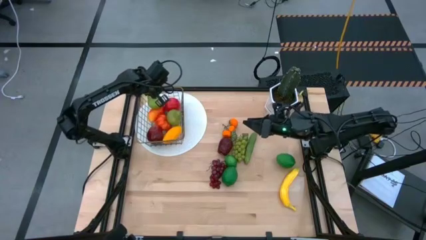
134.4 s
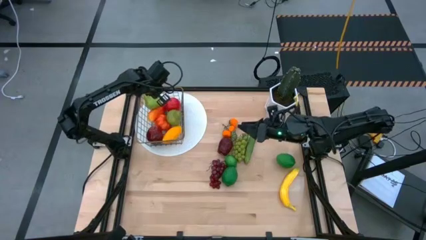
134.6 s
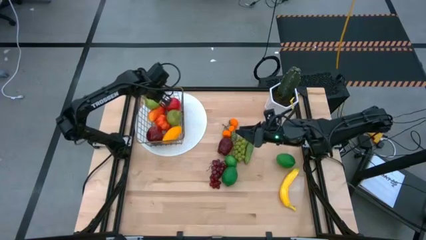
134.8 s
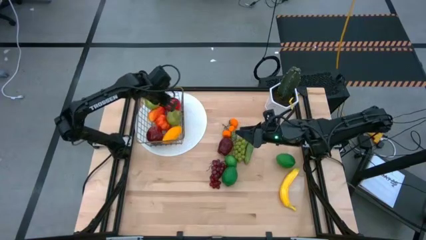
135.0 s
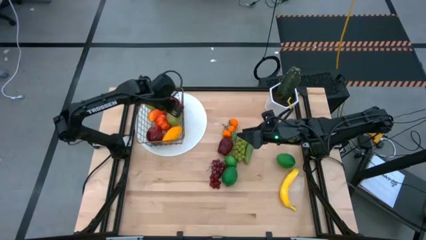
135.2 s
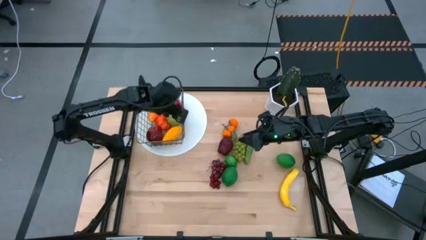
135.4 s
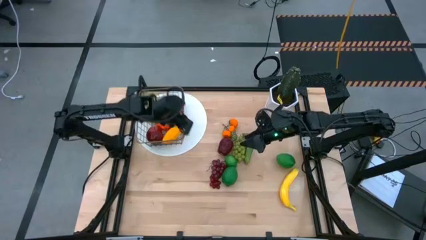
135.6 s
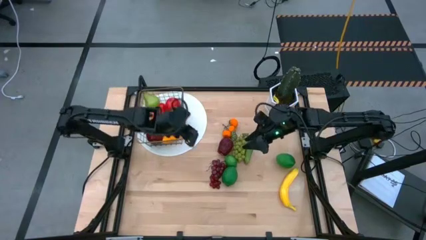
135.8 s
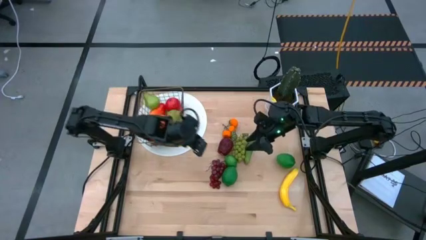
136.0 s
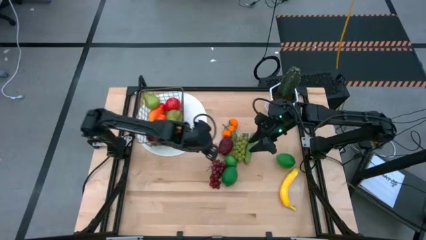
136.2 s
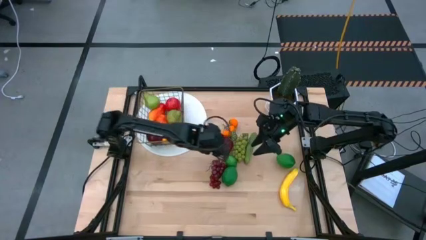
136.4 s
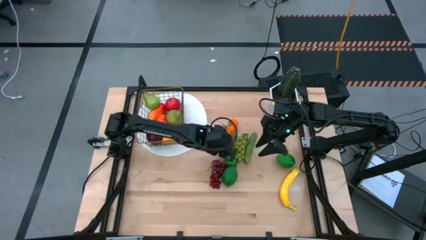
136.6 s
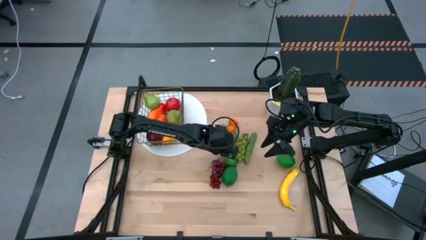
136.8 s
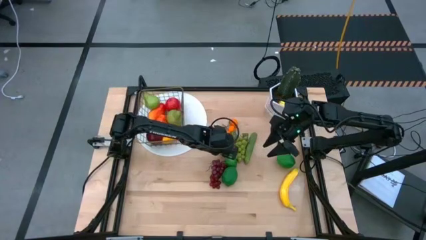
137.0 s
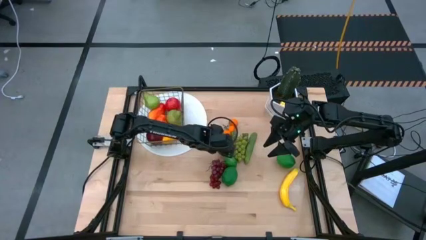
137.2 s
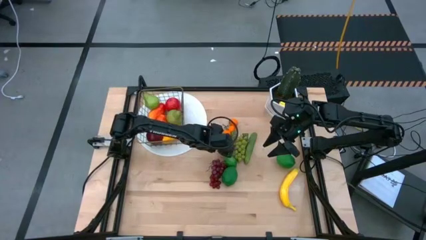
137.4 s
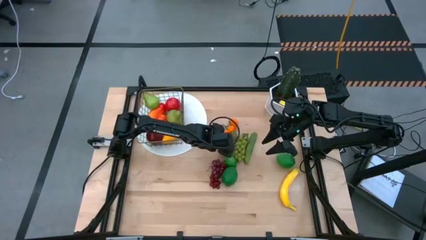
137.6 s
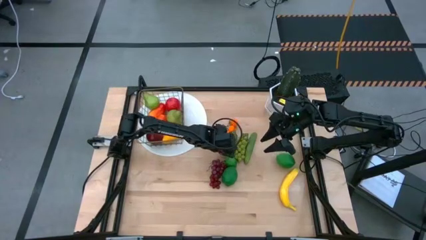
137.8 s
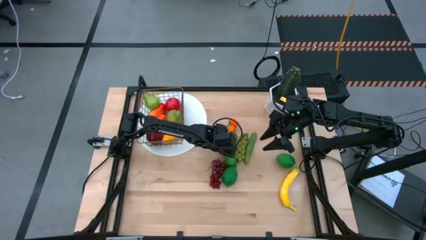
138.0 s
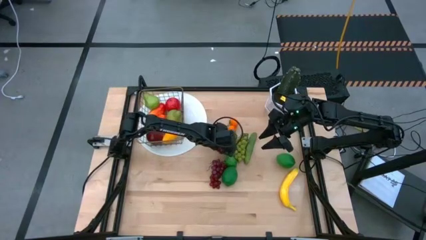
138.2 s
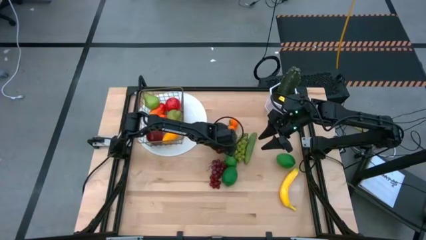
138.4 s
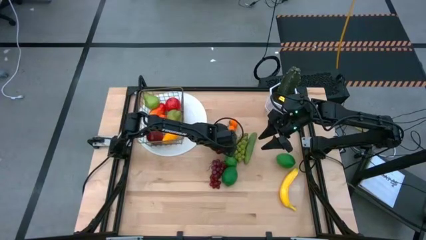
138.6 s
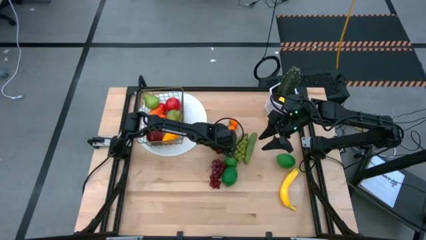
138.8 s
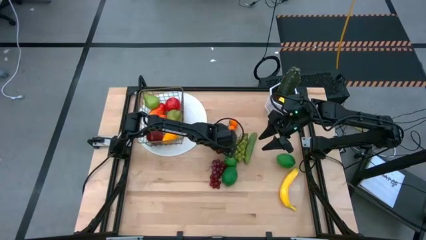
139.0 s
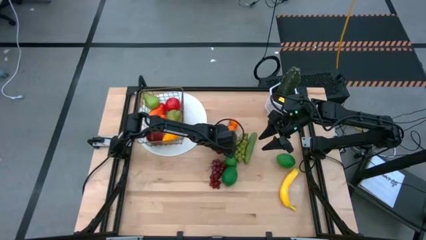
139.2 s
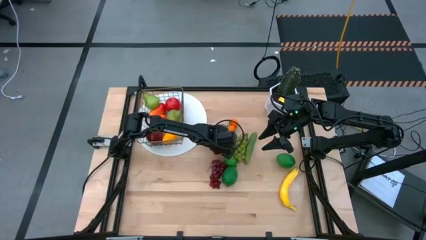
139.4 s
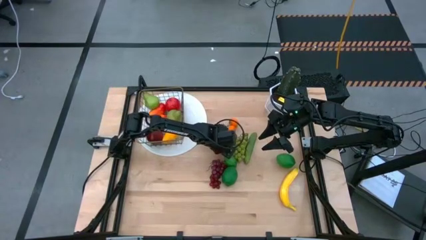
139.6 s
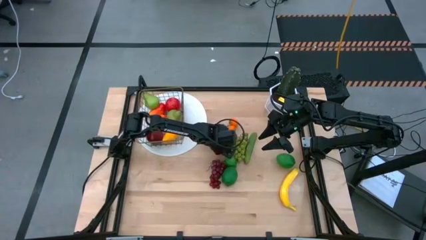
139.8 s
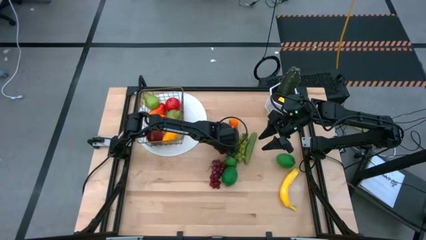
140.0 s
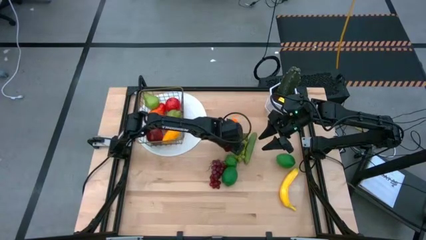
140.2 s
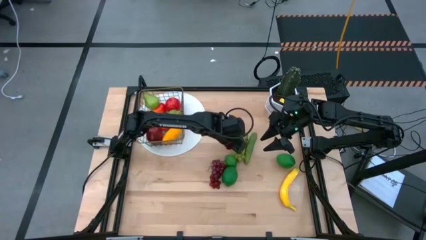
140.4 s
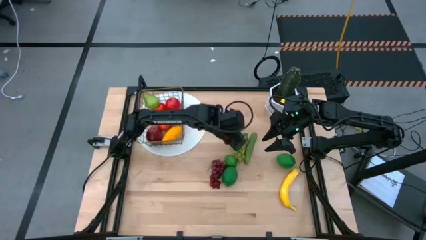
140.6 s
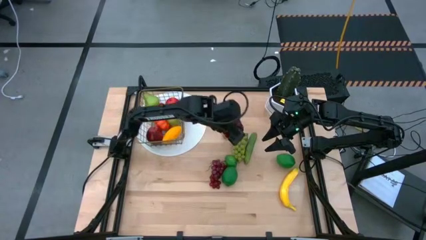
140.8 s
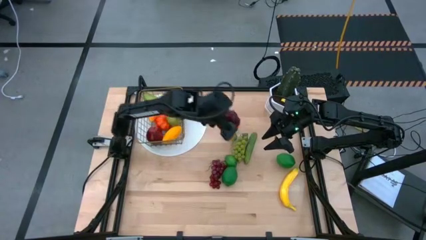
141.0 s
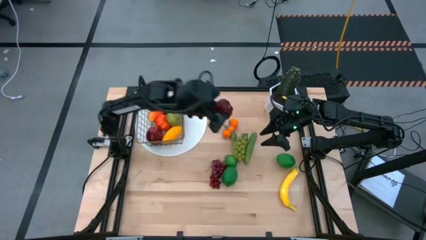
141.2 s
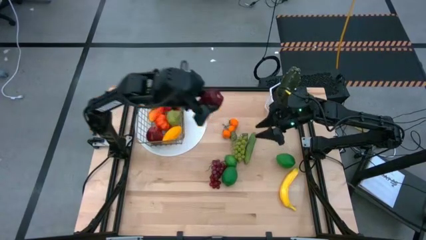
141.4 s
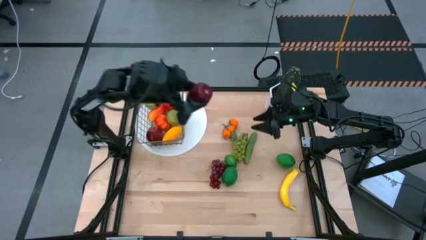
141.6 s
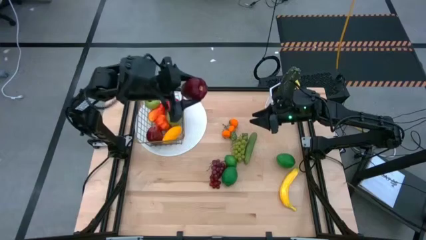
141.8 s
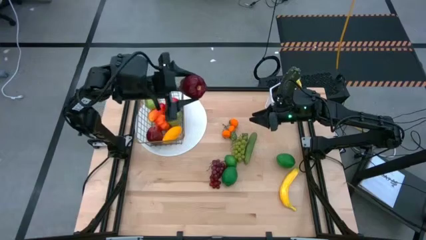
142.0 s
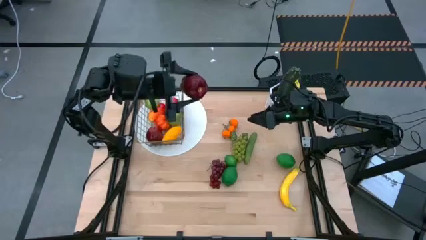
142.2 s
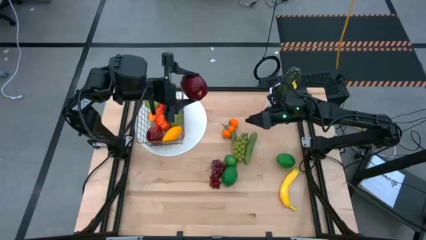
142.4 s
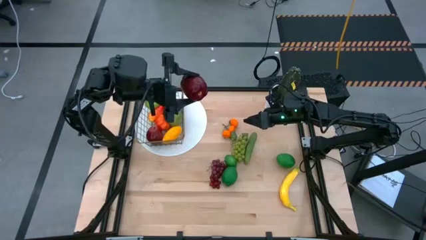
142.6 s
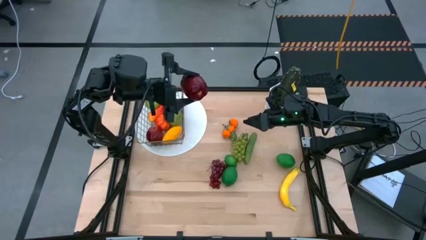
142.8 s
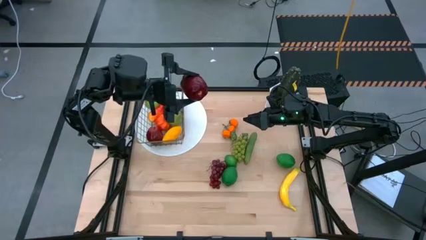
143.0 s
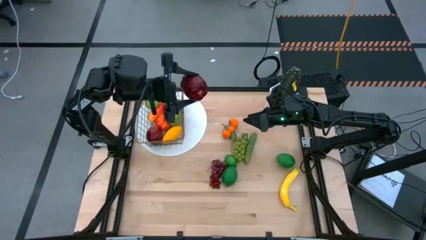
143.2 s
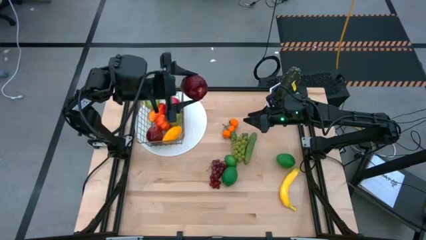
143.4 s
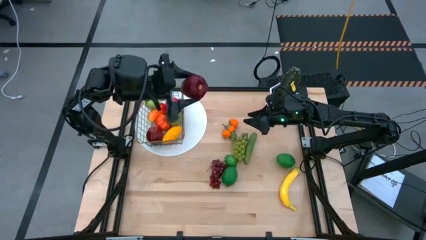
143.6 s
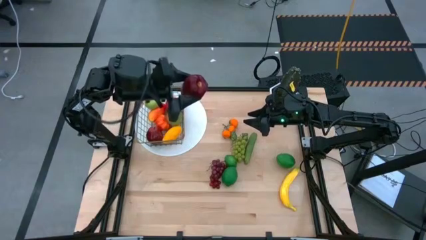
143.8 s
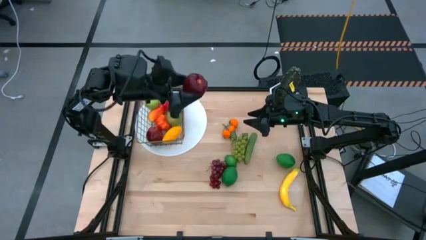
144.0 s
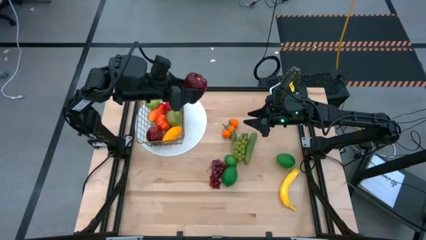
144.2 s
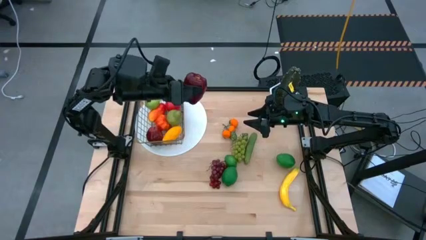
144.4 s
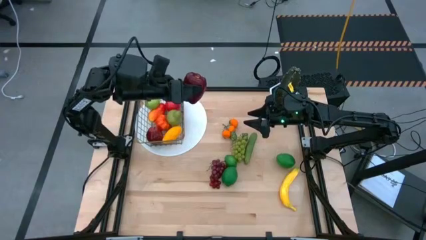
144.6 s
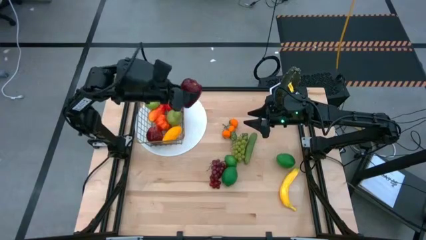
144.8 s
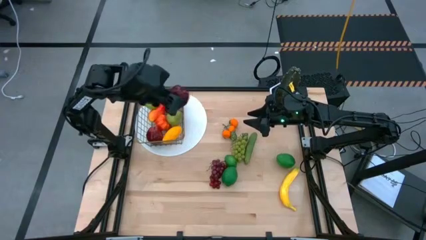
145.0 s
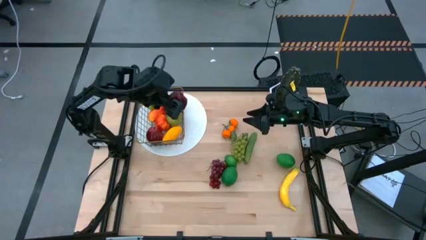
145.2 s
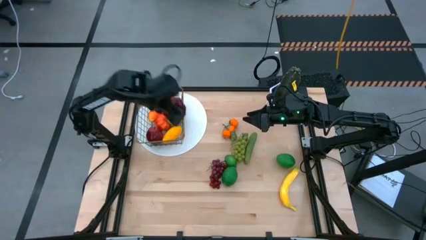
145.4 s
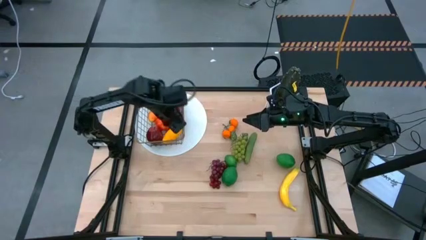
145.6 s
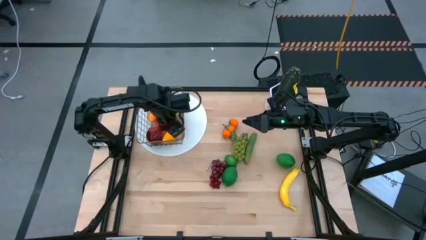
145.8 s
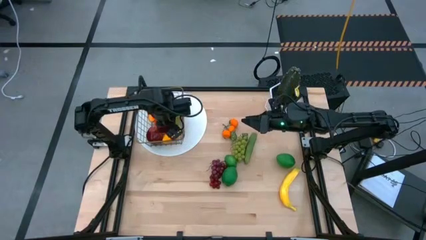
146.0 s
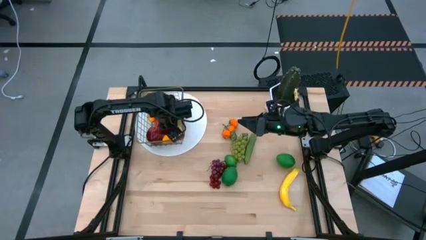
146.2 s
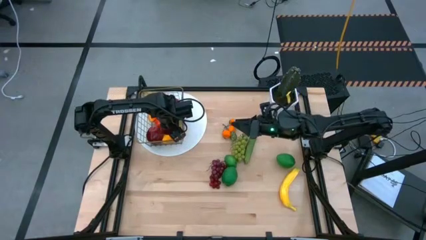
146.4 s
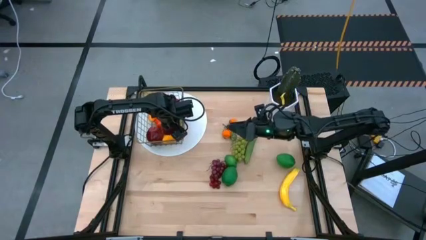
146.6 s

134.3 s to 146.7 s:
Task: Build produce basket
Put the dark red apple into the wire basket

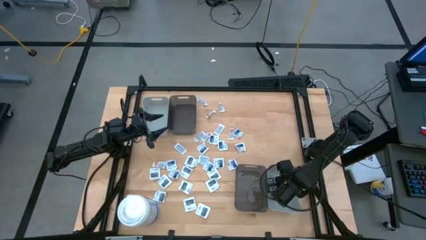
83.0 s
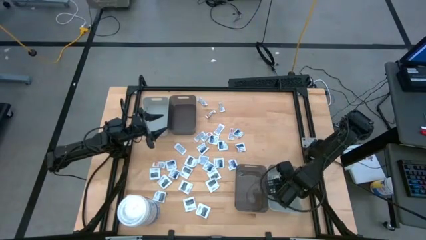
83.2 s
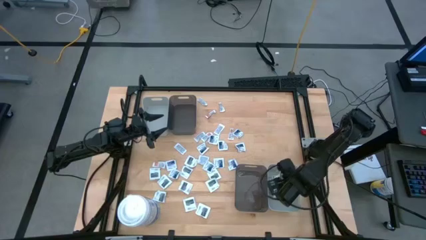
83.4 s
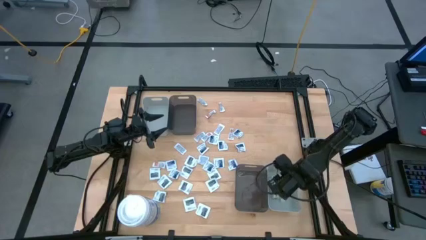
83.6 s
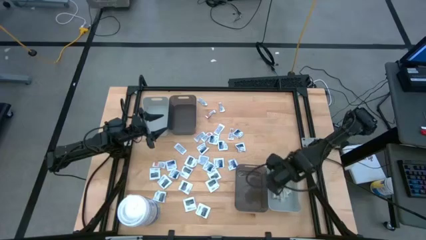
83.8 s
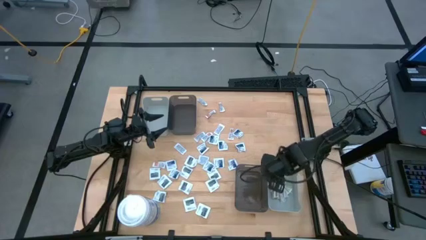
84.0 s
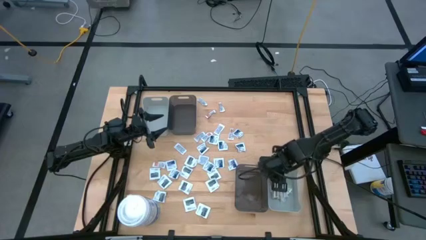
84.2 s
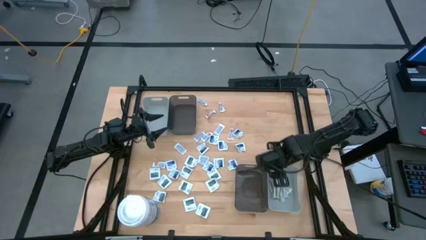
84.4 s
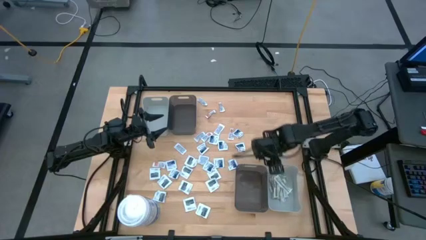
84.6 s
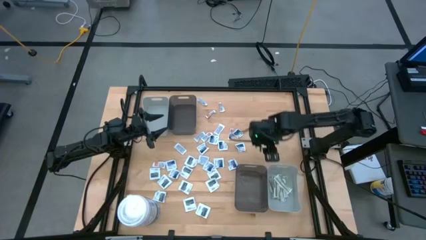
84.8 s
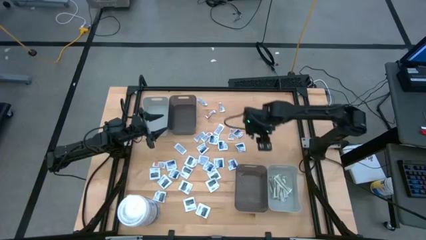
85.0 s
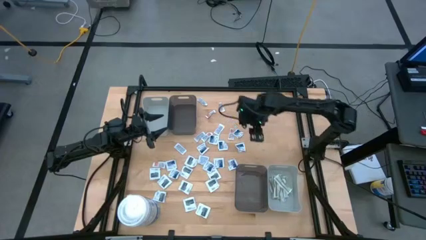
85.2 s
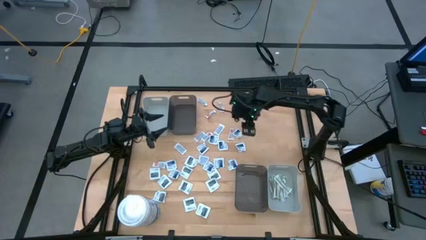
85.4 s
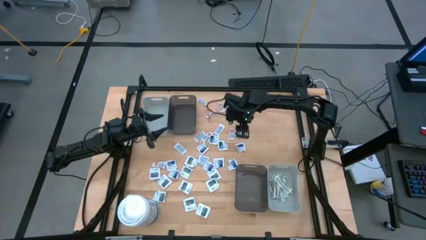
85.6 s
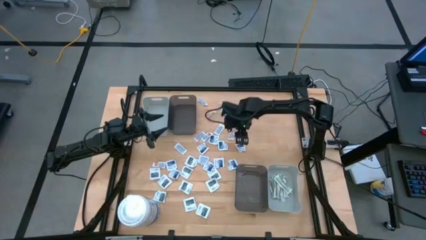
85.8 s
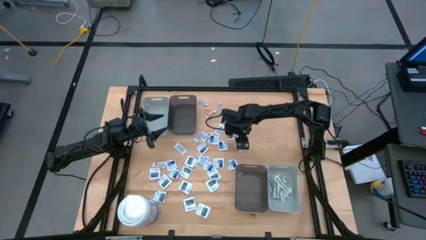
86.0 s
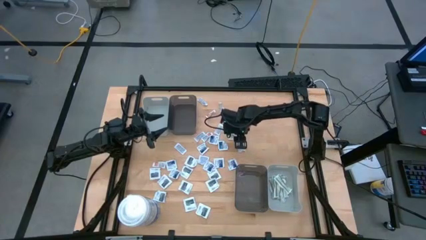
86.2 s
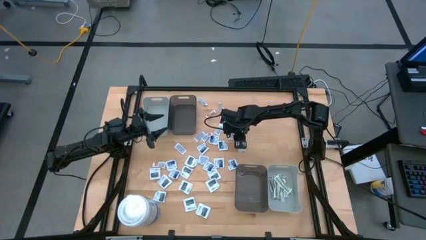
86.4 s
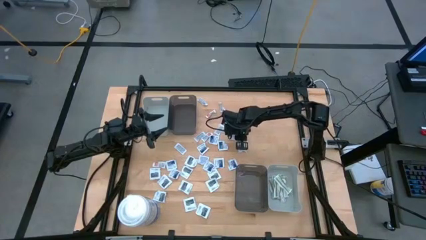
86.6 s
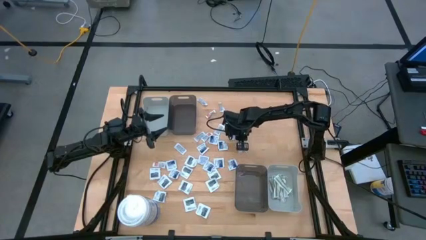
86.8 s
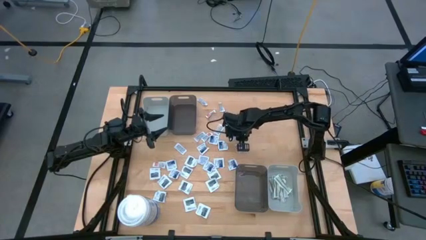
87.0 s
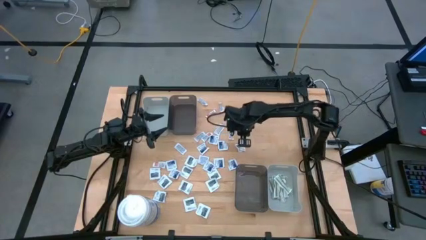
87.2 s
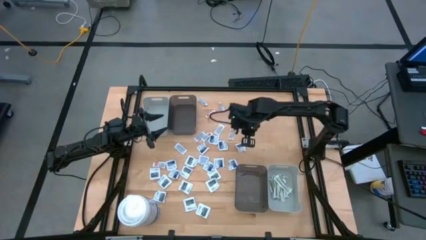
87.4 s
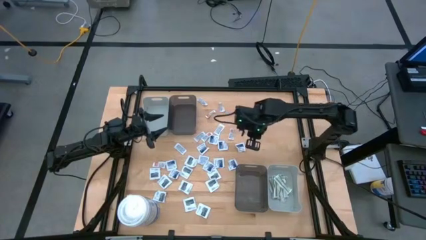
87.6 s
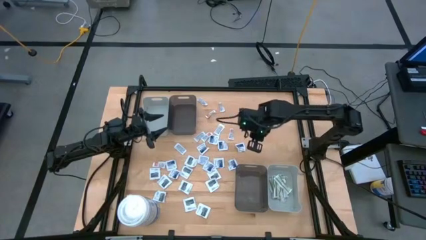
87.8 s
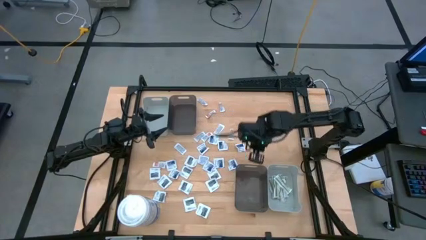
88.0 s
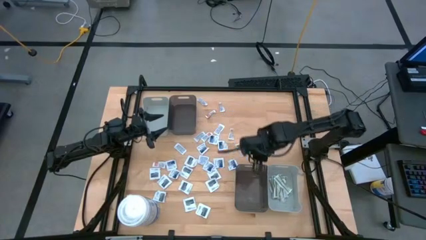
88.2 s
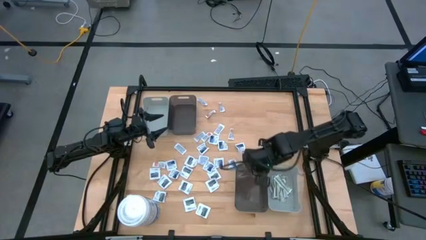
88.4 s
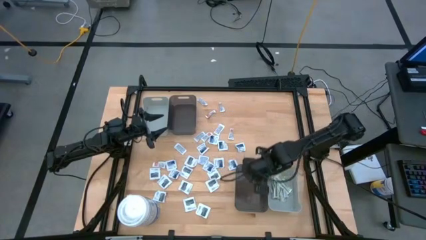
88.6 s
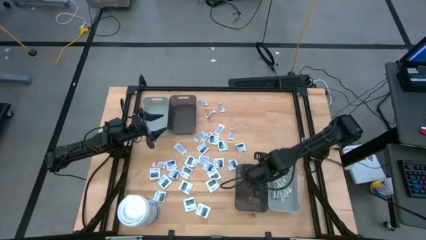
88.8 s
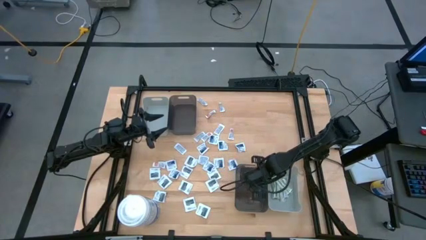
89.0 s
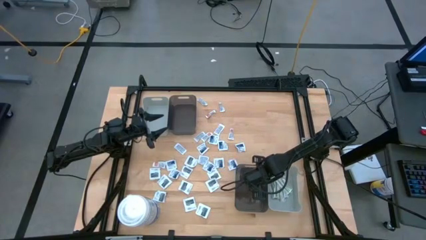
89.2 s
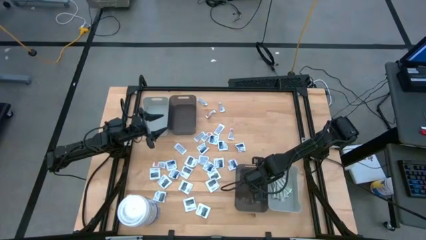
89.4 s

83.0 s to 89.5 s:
Task: Pick & Place First Aid Supplies
Put the white alcohol pad into the bottom black bin
